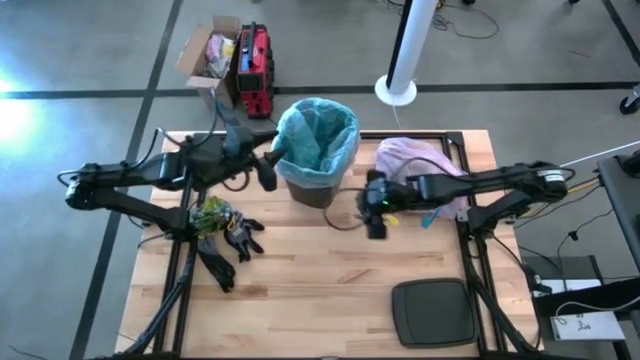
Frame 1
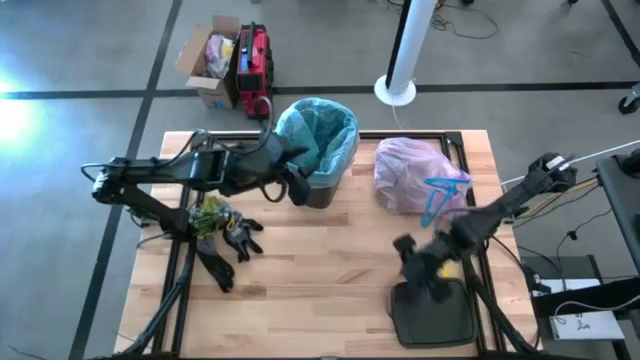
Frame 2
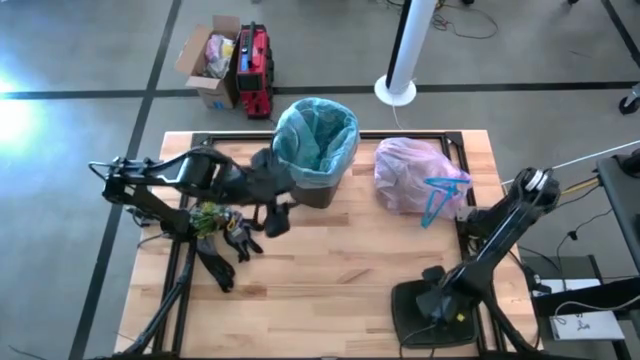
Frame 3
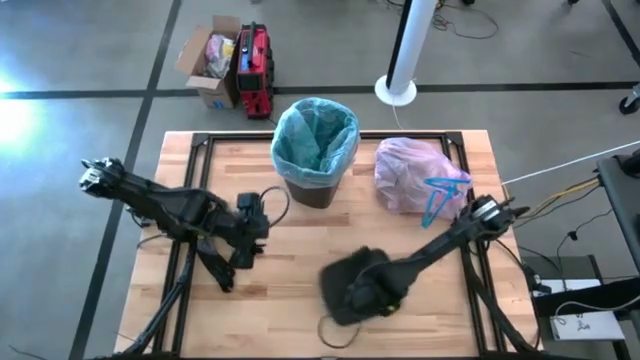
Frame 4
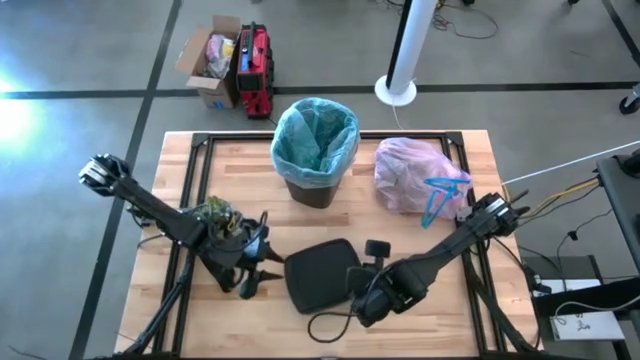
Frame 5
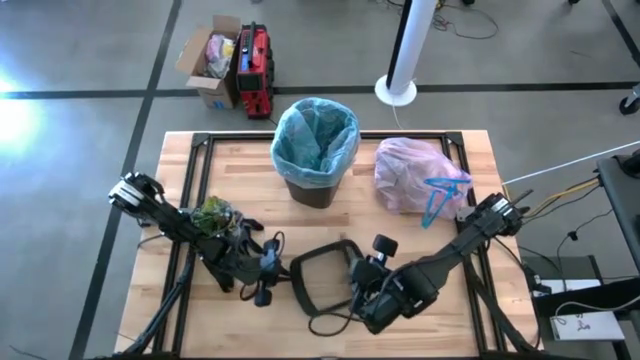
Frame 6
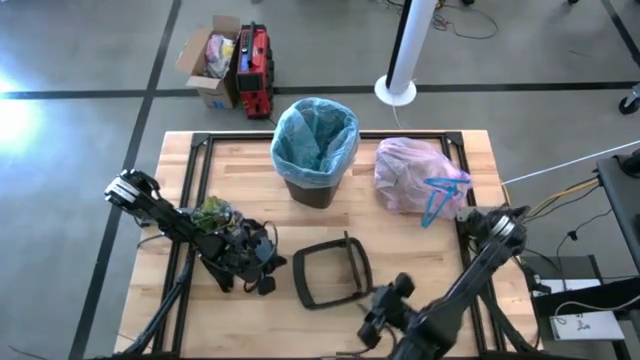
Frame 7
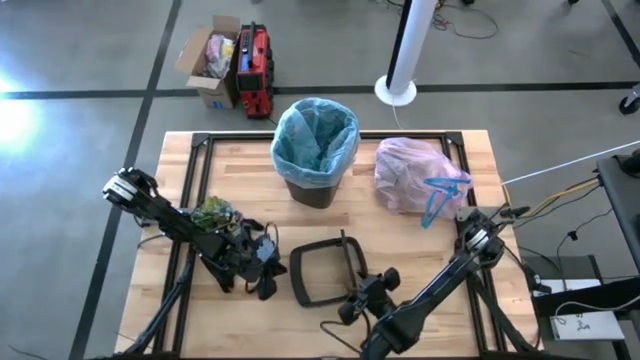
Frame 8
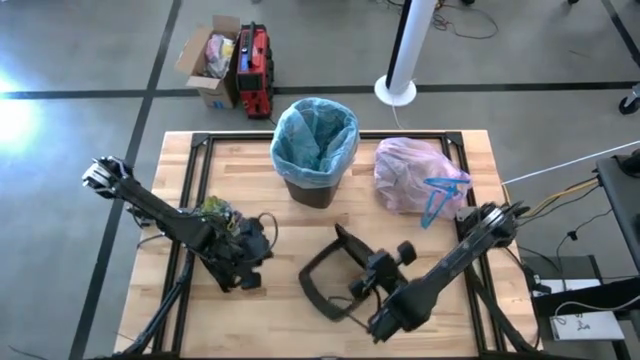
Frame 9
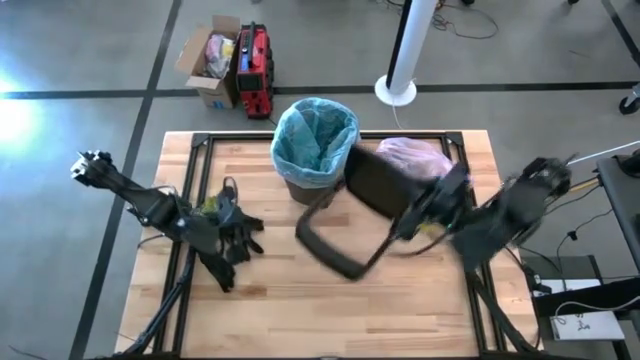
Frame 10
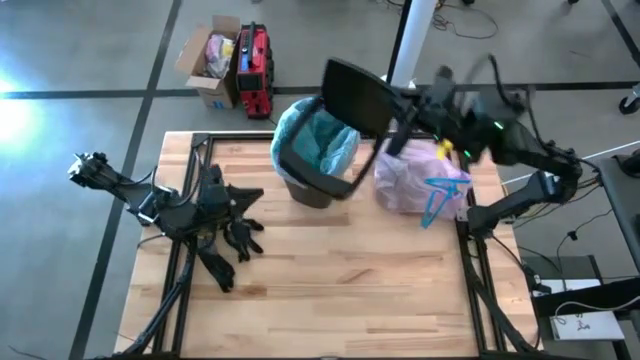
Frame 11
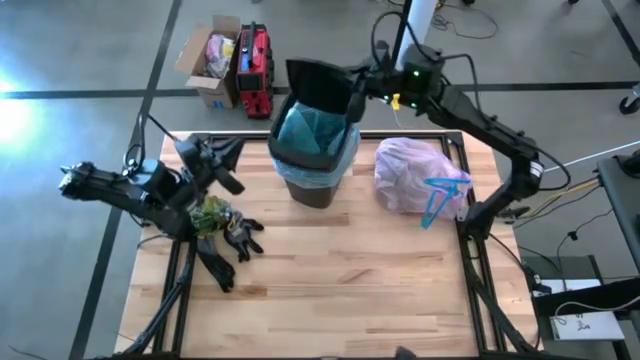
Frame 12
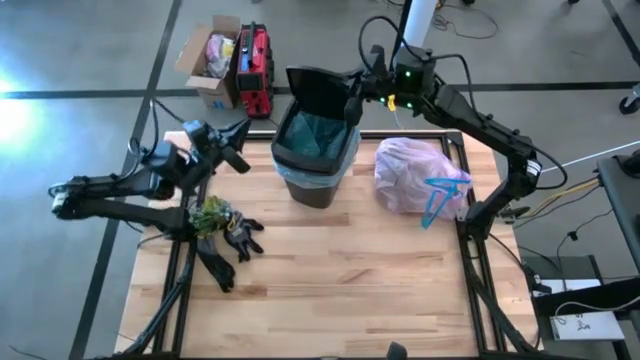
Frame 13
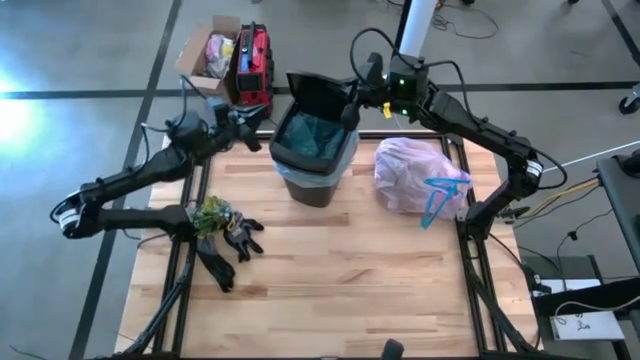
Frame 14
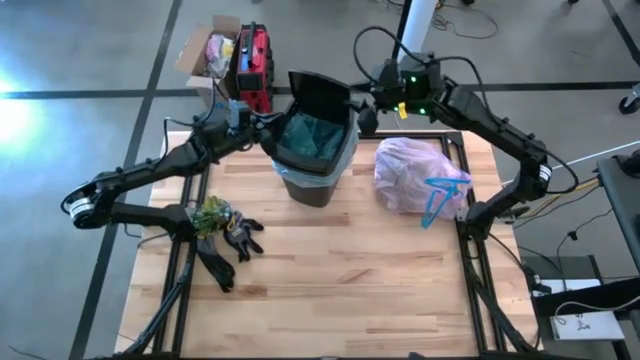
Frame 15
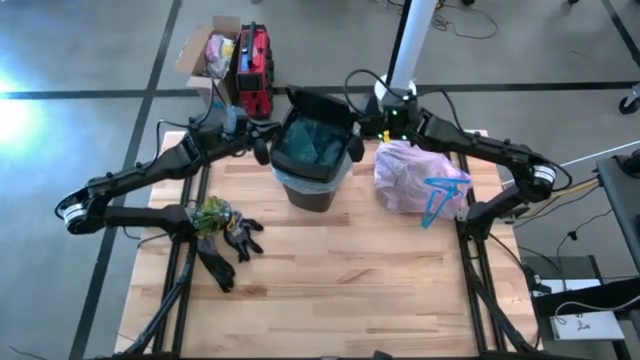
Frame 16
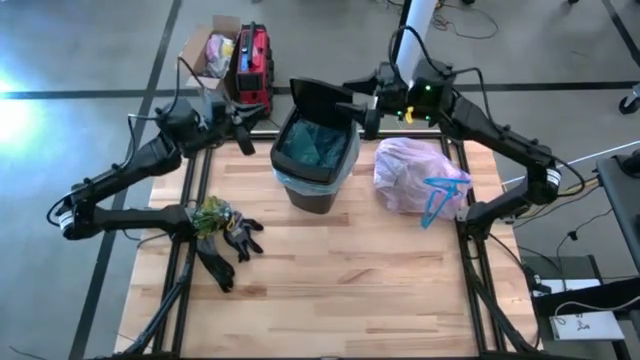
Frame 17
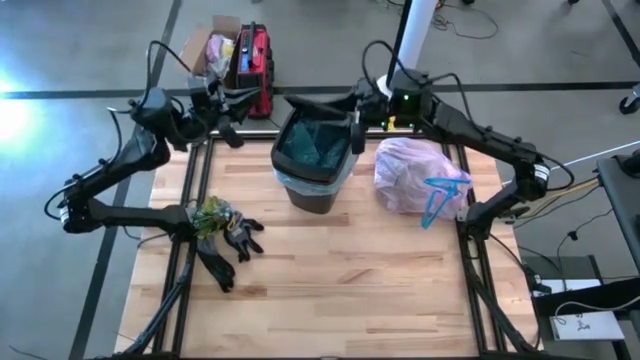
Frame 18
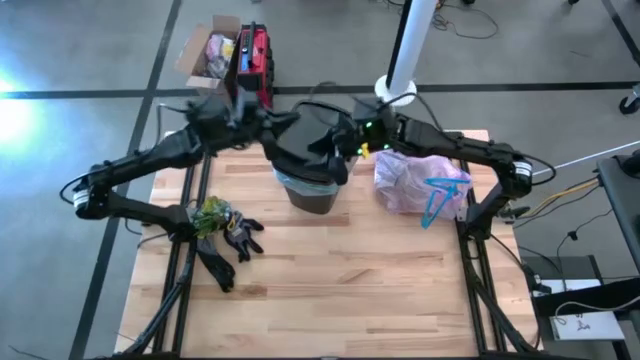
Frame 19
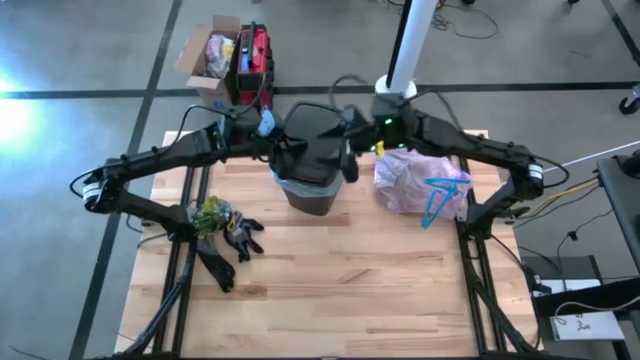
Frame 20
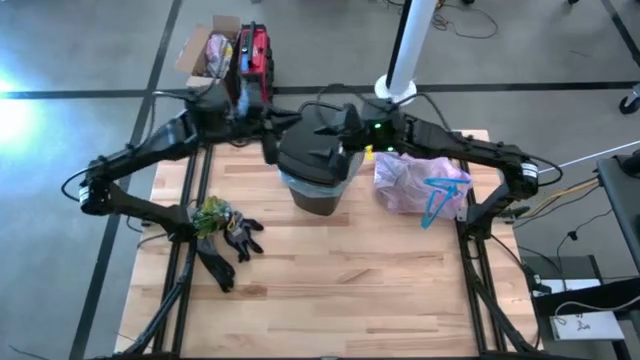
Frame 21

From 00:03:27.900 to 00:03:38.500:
Task: place trash/remove bag and relplace
Close the trash bin lid

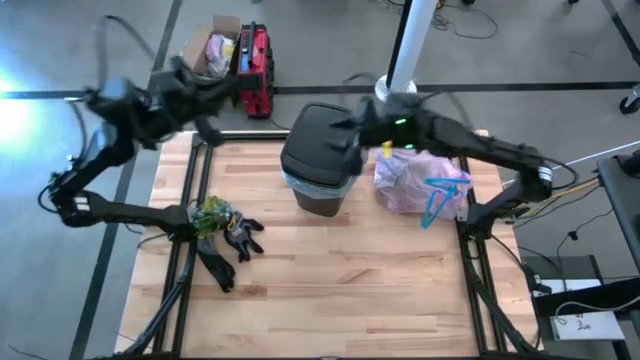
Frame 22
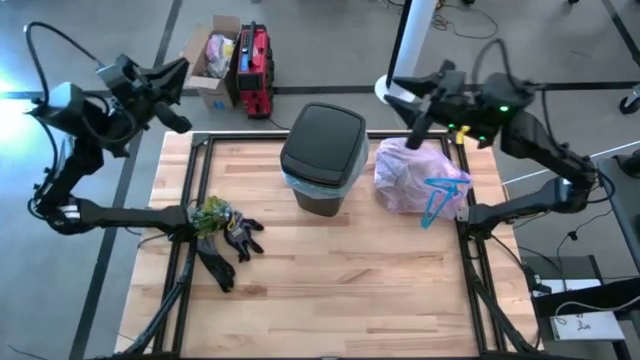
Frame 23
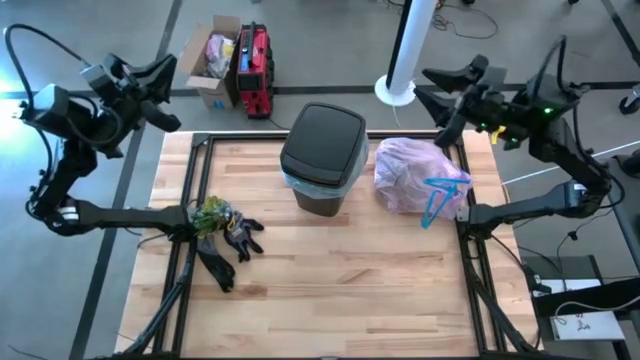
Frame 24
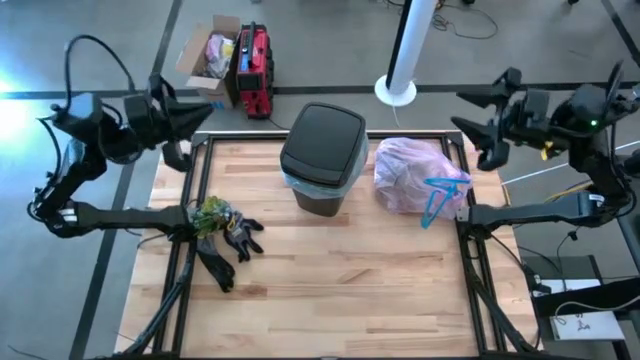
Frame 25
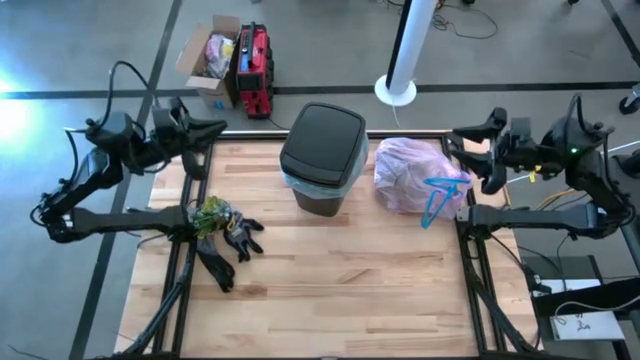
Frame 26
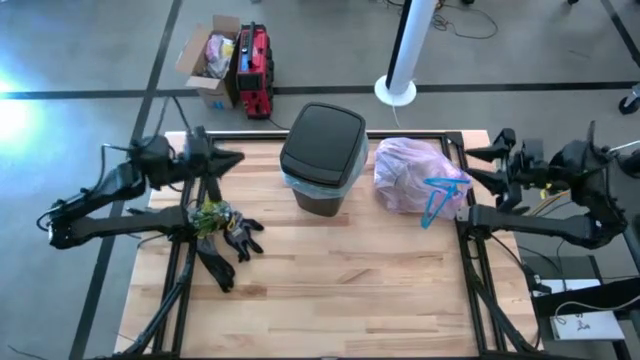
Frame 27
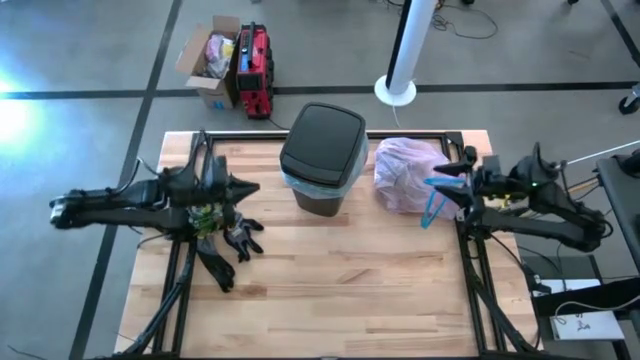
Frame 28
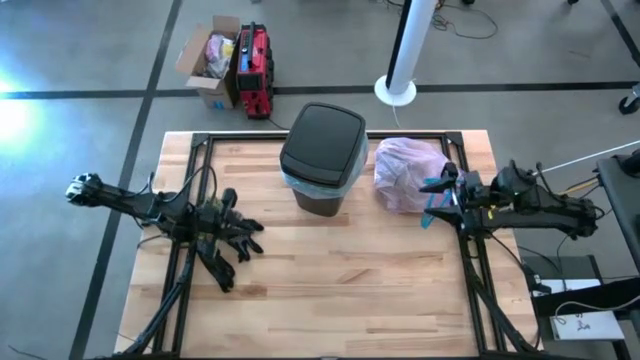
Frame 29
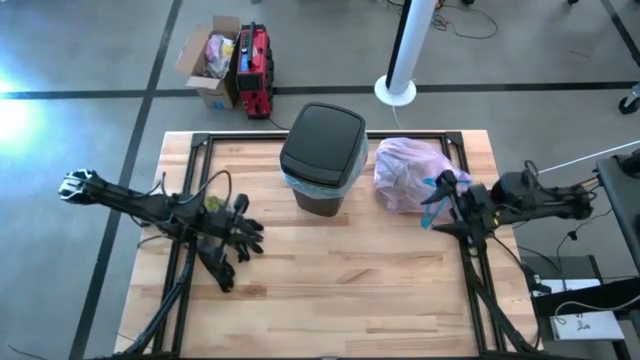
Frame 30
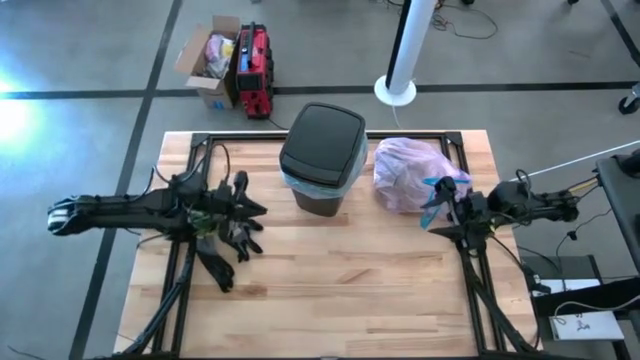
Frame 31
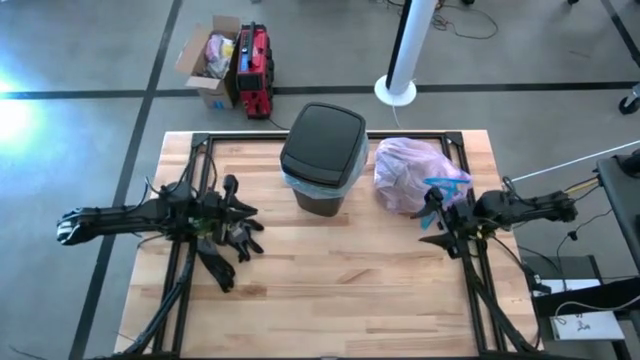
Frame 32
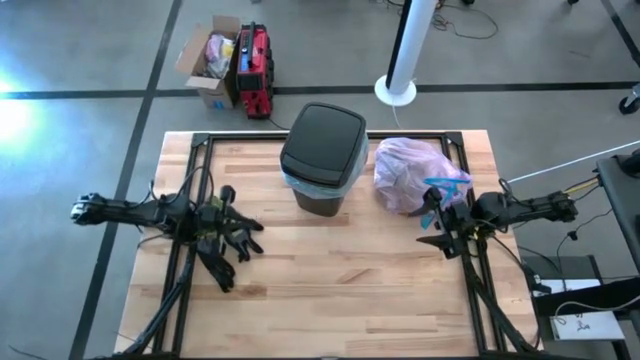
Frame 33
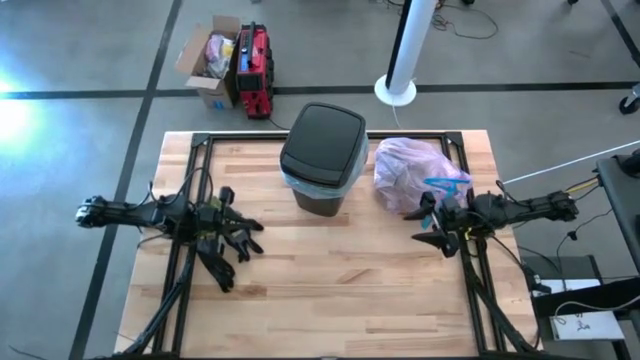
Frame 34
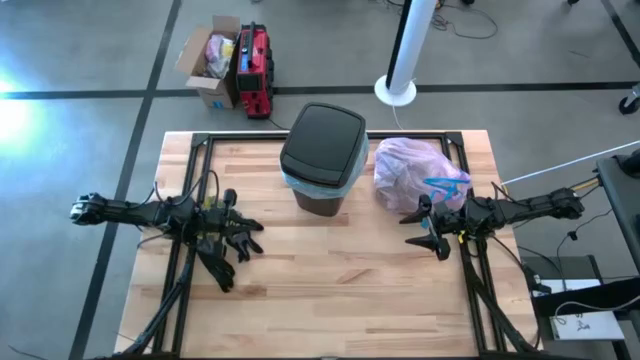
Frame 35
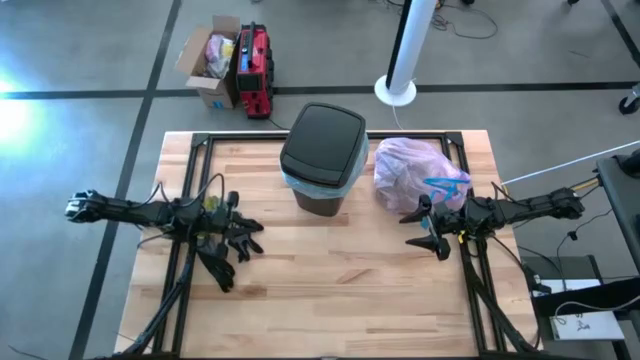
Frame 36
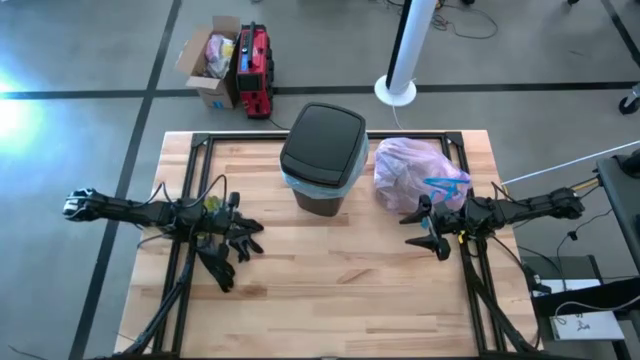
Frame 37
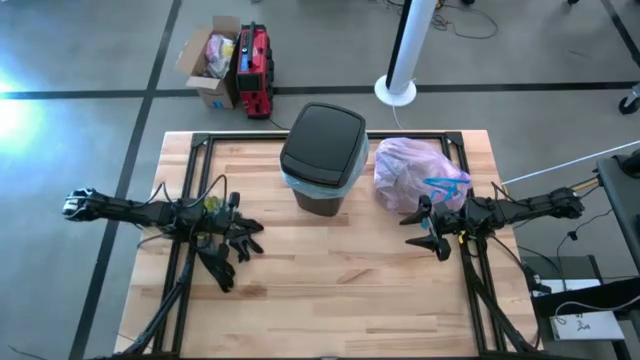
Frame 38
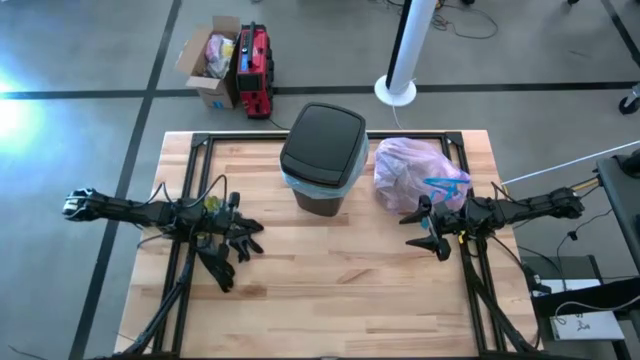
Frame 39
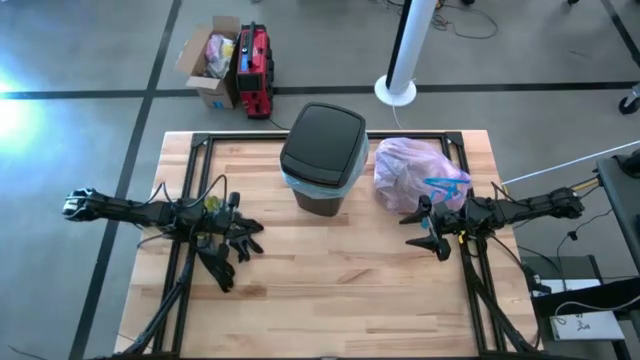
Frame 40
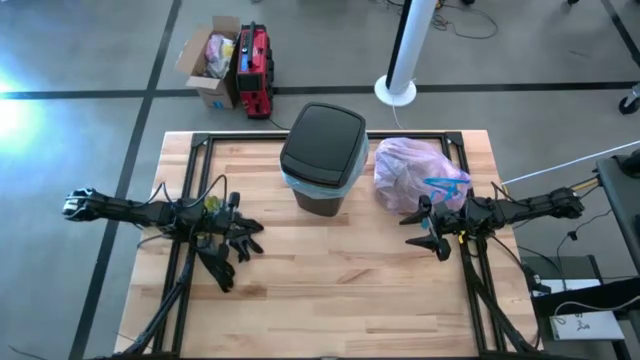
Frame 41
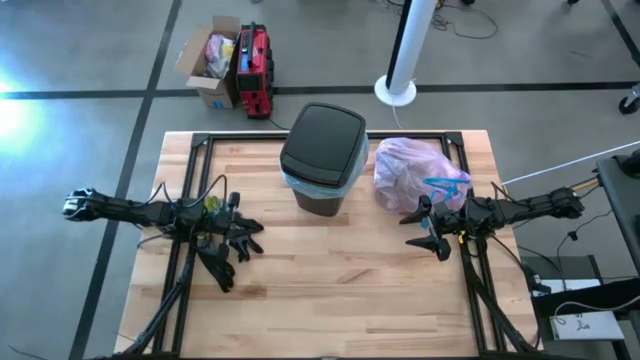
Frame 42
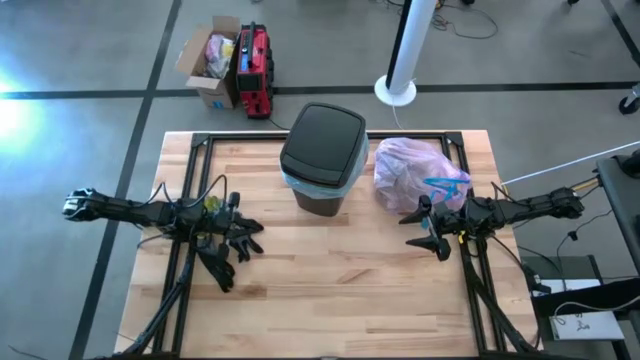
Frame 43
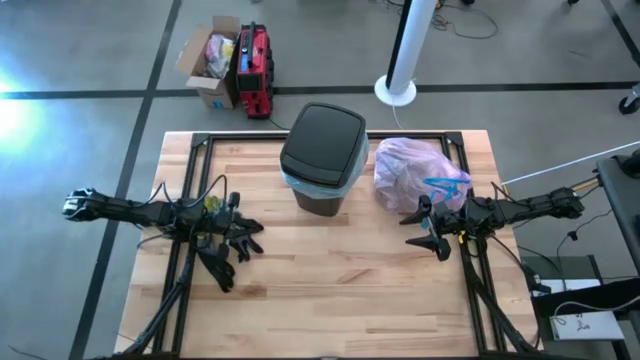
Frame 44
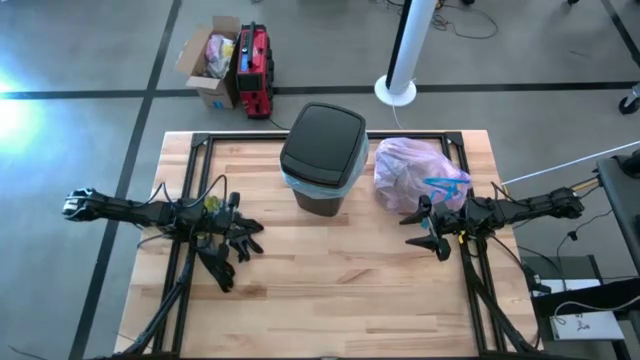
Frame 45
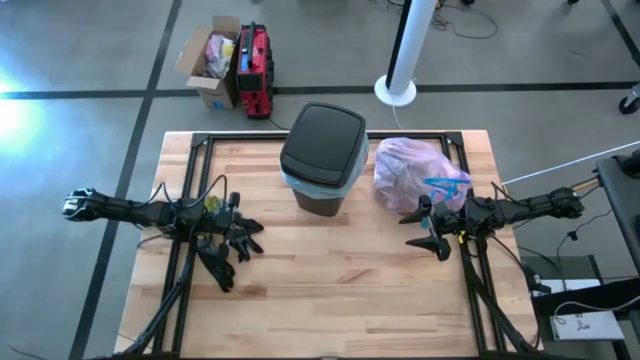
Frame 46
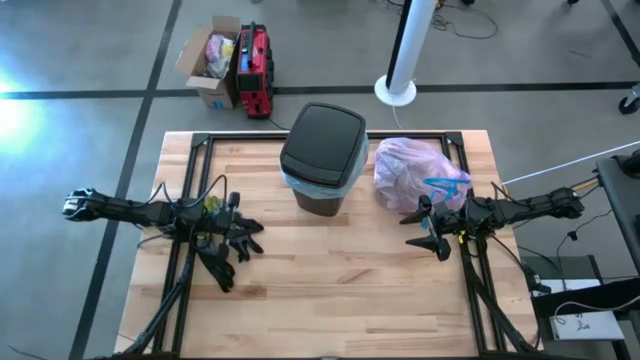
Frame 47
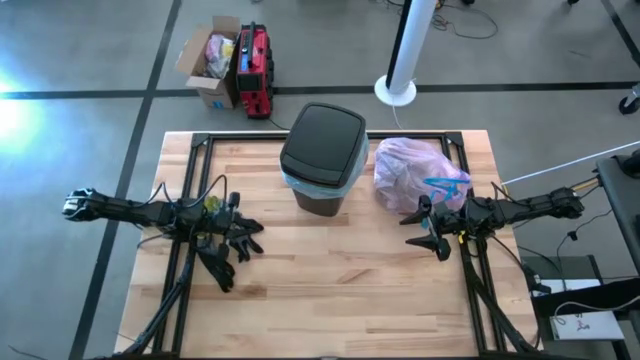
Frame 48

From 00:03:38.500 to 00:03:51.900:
Return to Home Position
